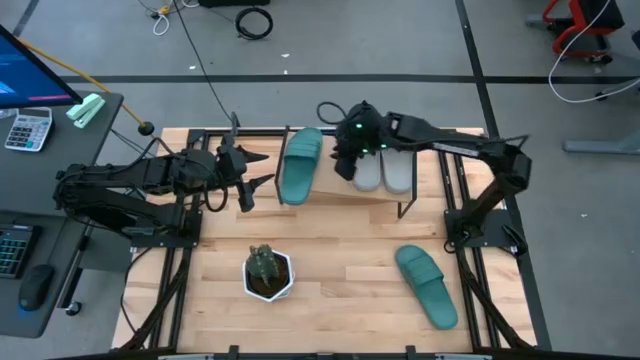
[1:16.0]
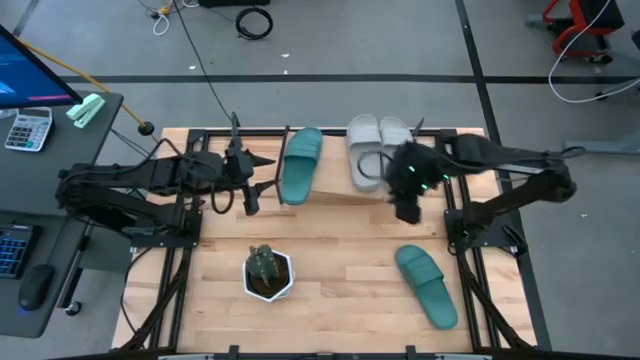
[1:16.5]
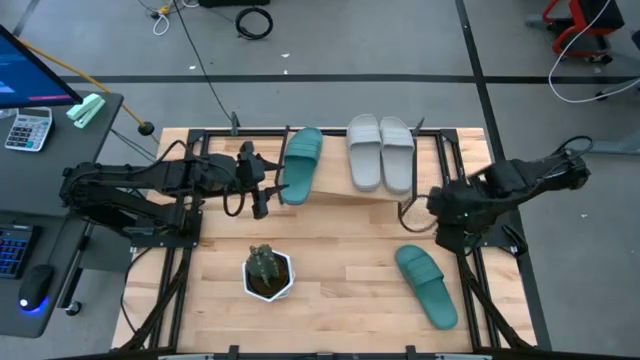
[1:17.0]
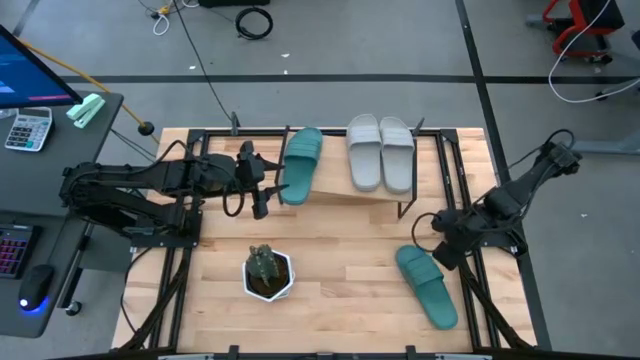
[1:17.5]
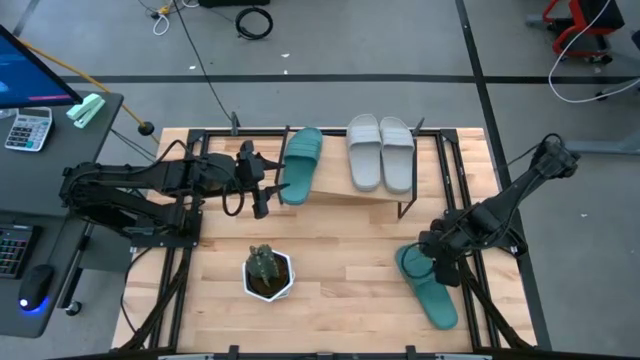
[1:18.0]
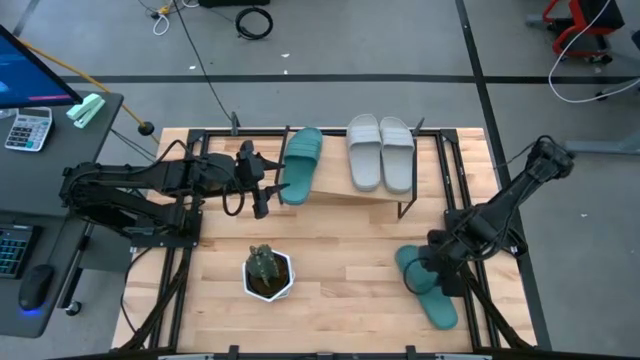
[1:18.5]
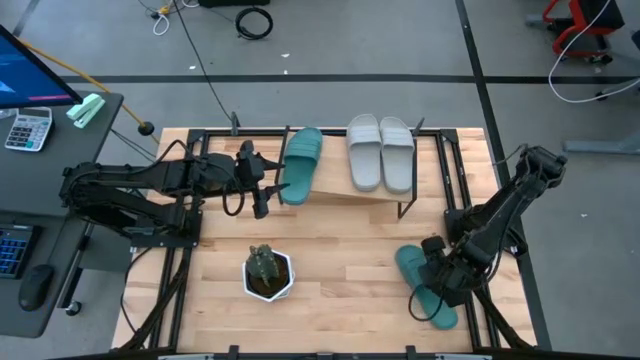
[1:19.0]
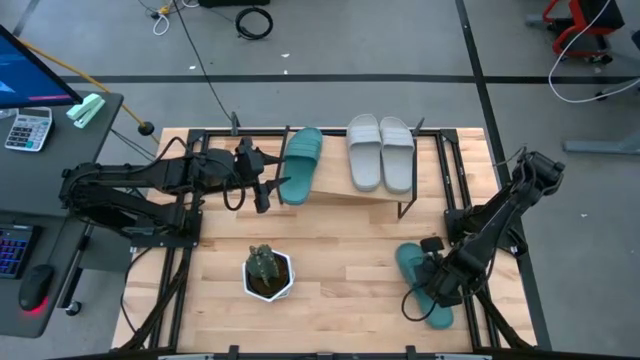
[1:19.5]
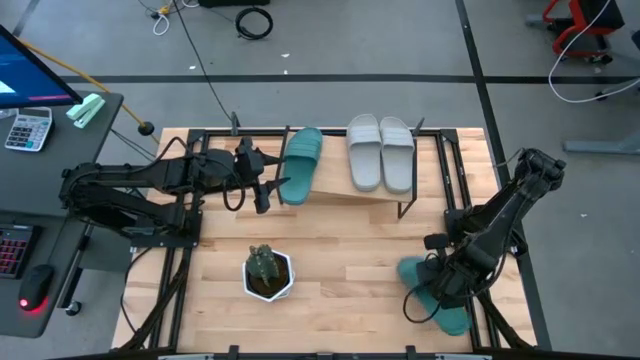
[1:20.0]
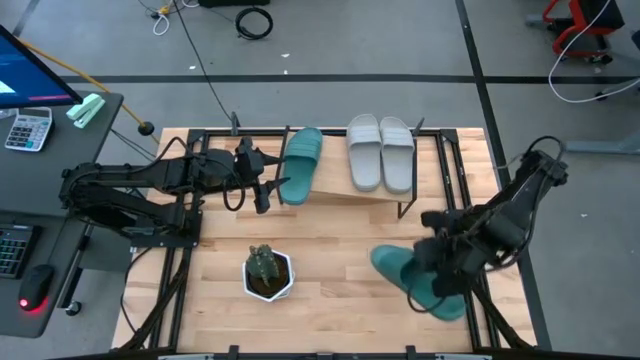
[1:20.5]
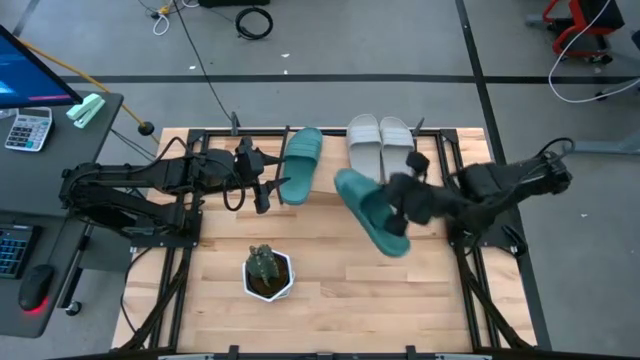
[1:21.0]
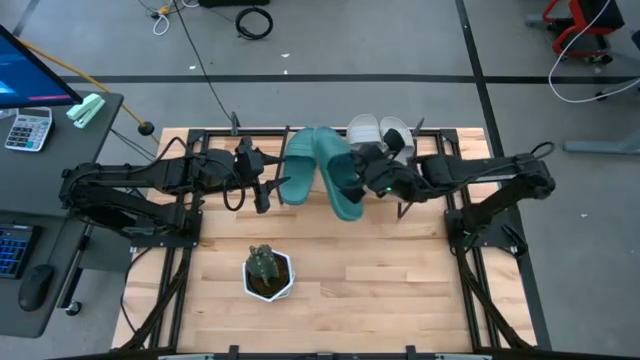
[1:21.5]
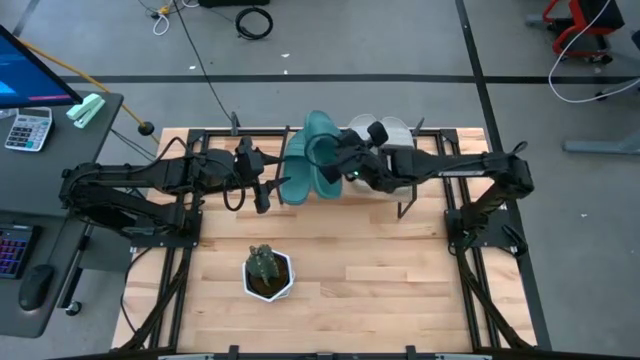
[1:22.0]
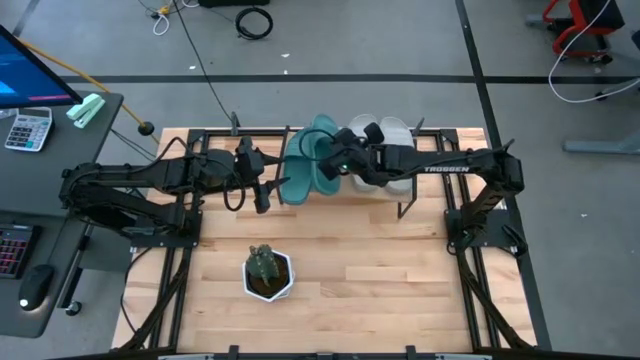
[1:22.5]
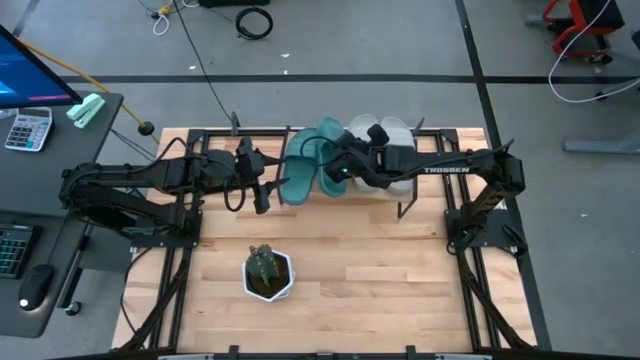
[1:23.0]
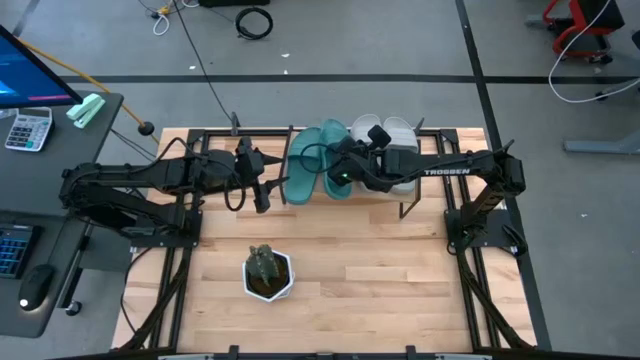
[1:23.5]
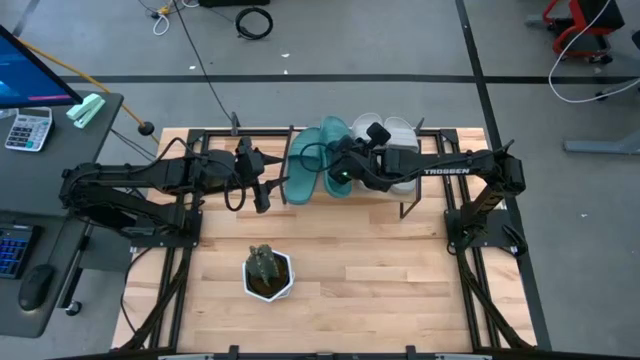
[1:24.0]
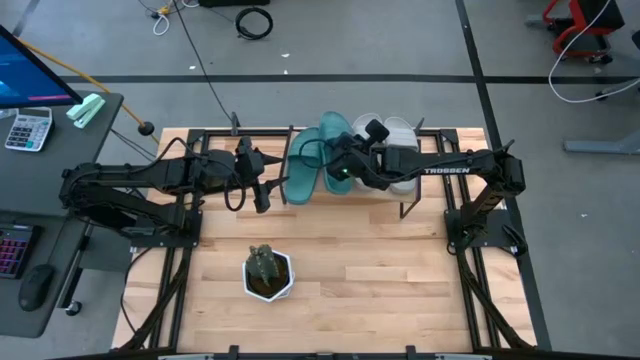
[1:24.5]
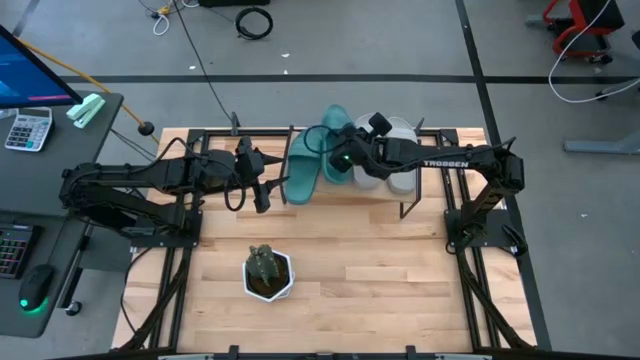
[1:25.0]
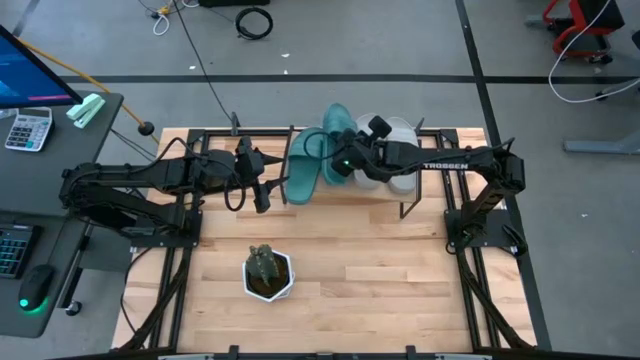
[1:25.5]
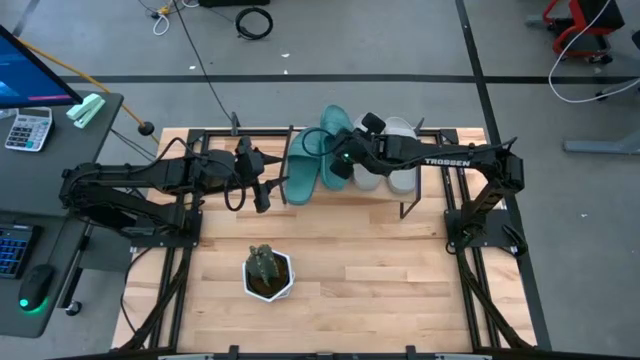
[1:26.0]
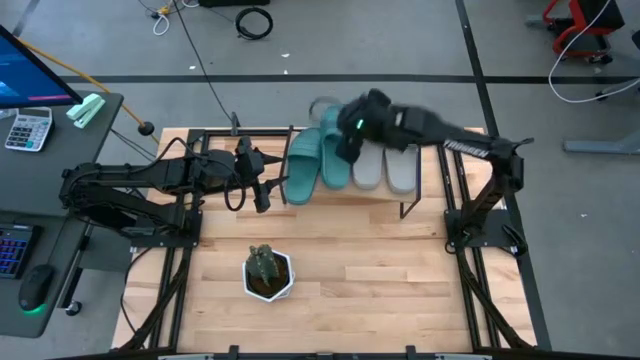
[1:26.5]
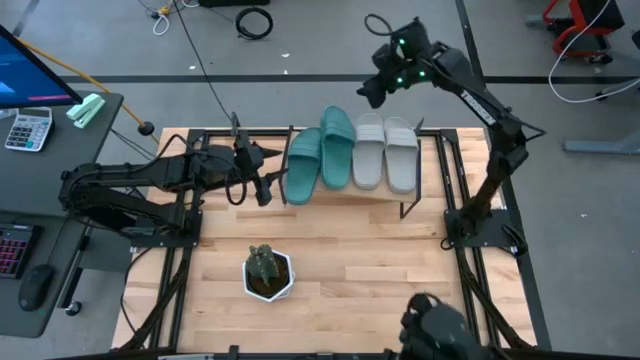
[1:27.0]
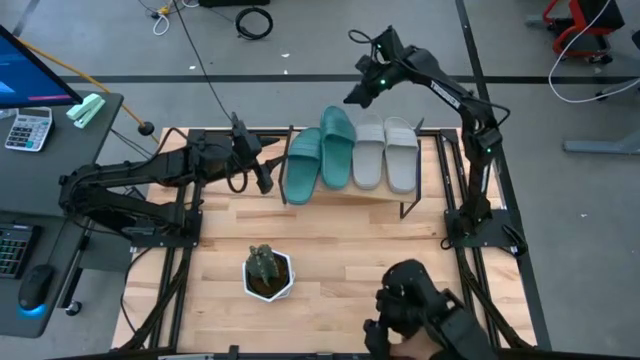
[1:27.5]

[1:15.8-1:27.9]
Task: Pick and place slides into the shelf
Put the green slide on the shelf

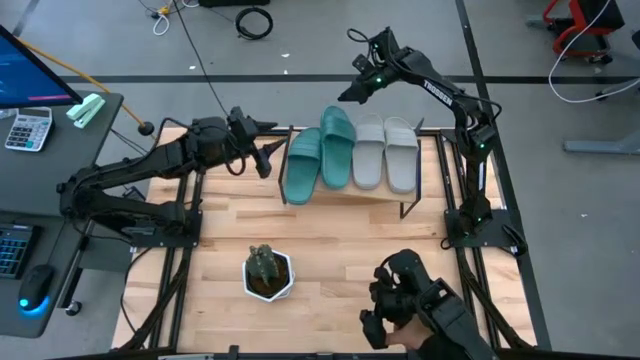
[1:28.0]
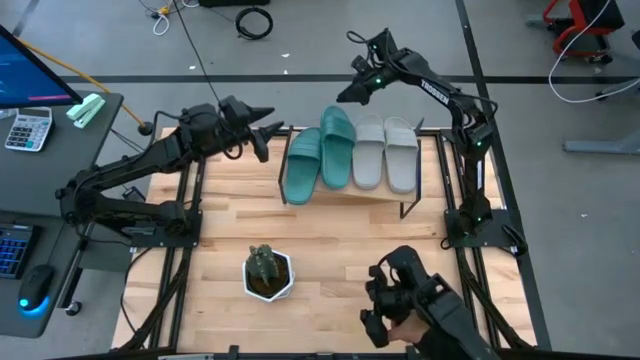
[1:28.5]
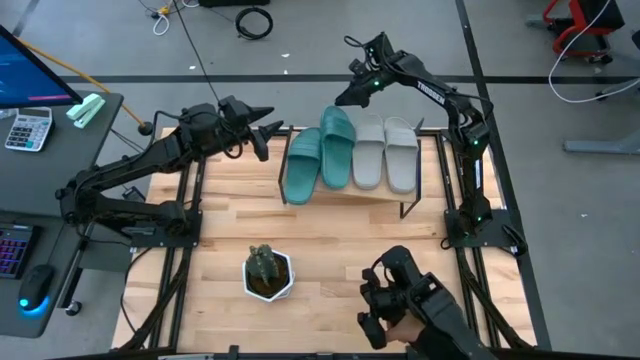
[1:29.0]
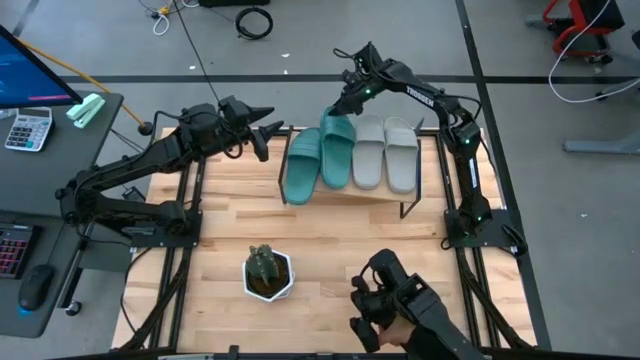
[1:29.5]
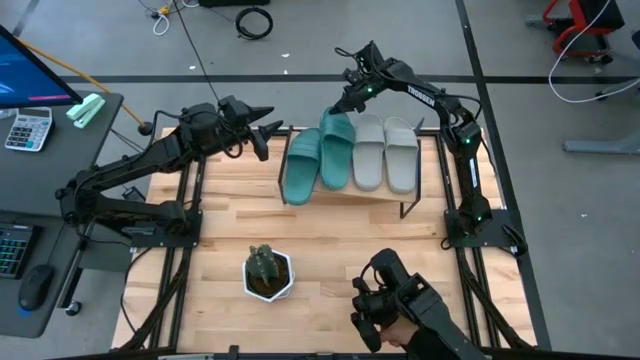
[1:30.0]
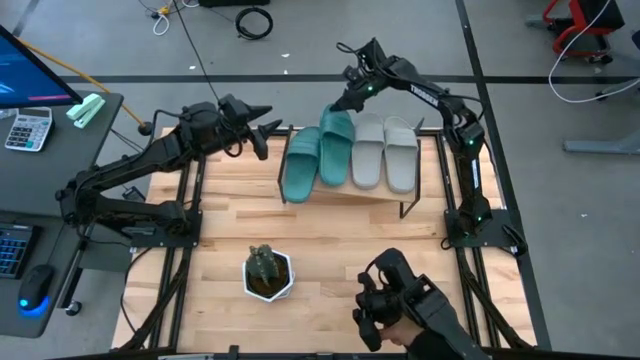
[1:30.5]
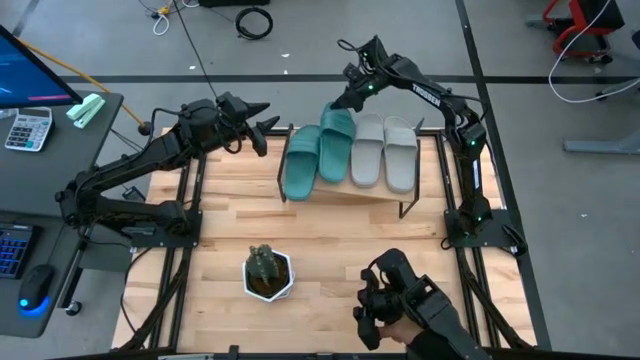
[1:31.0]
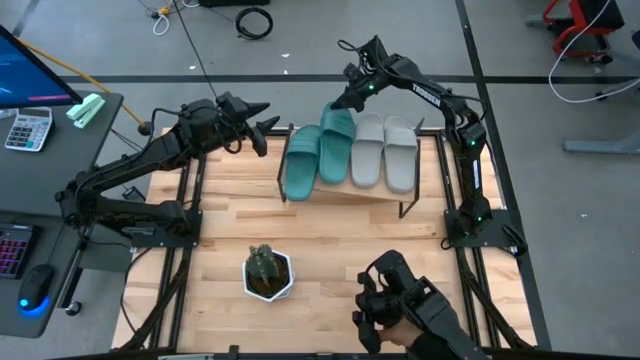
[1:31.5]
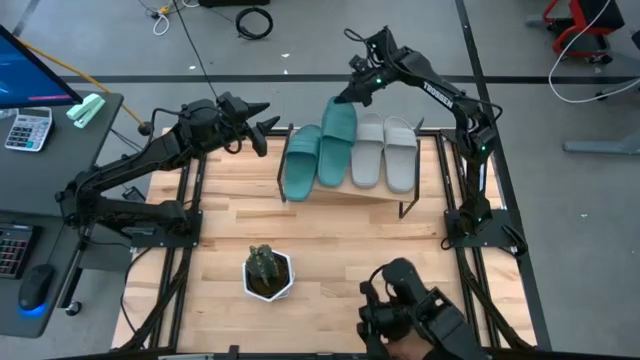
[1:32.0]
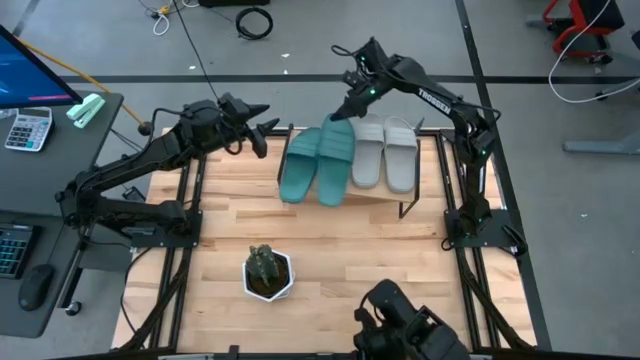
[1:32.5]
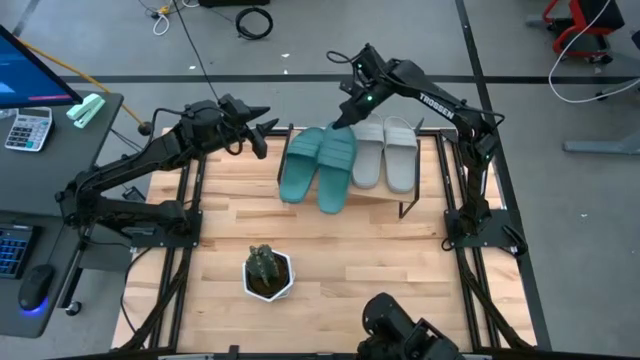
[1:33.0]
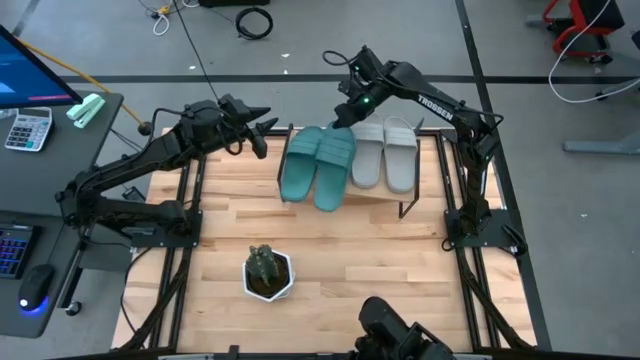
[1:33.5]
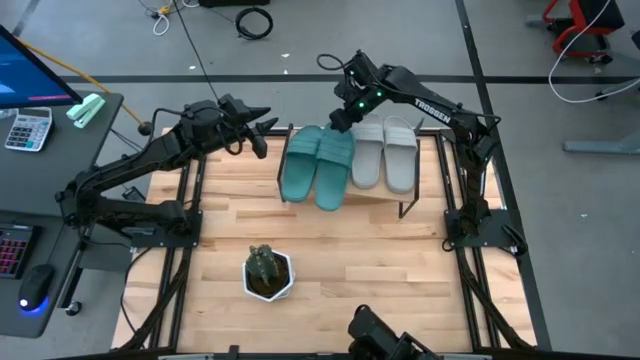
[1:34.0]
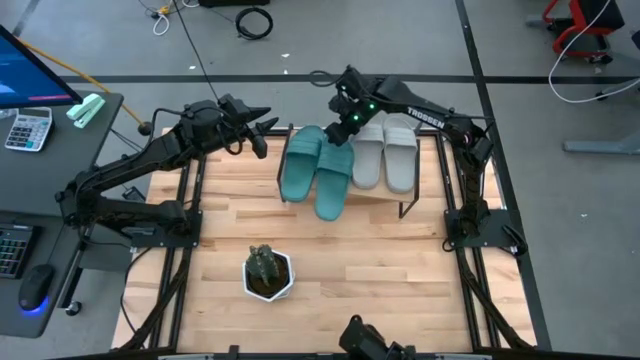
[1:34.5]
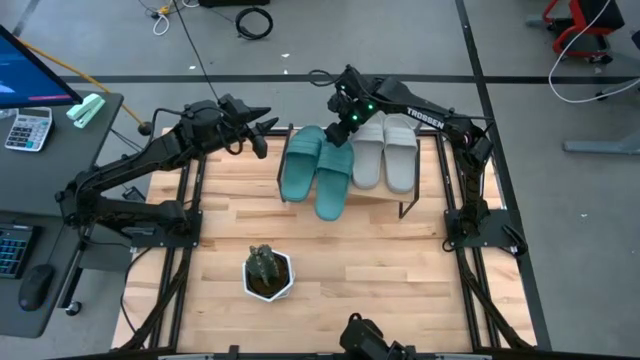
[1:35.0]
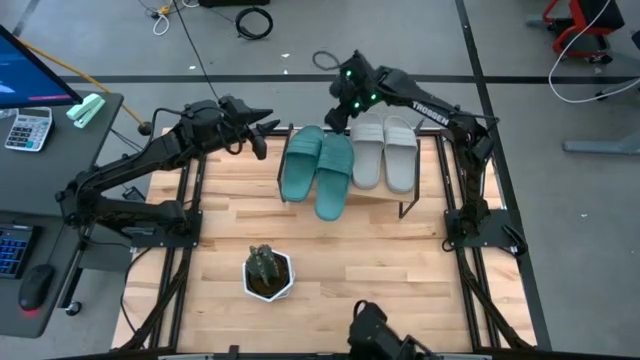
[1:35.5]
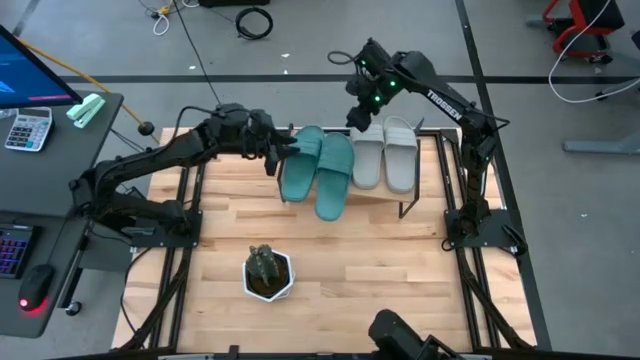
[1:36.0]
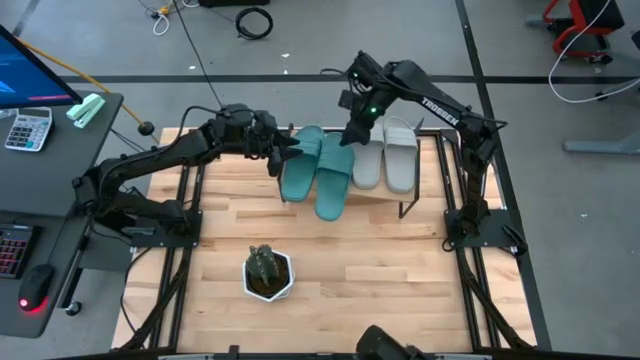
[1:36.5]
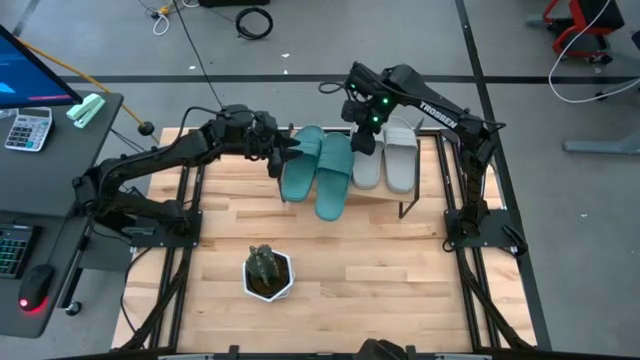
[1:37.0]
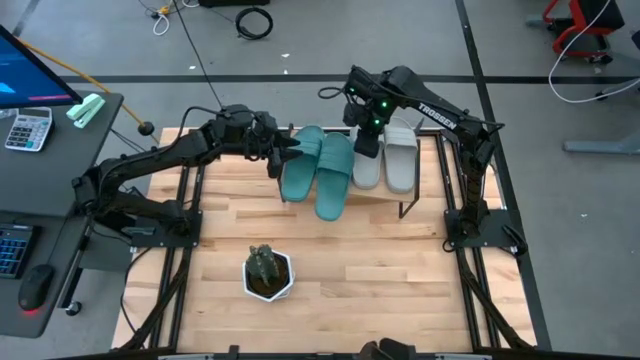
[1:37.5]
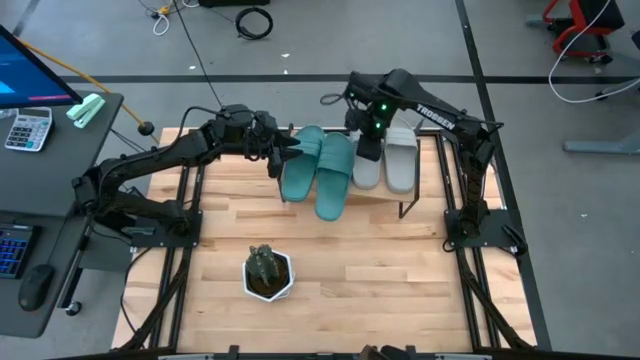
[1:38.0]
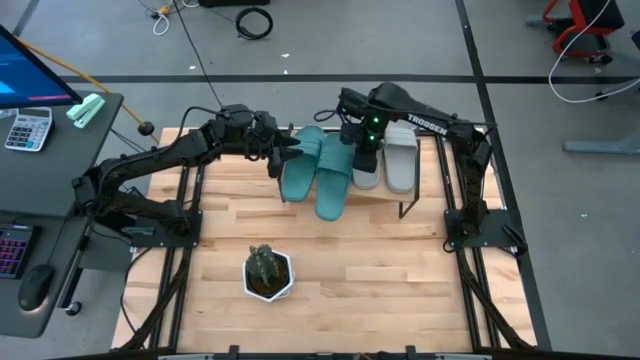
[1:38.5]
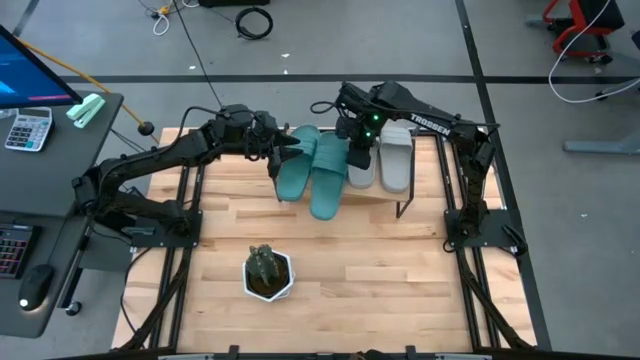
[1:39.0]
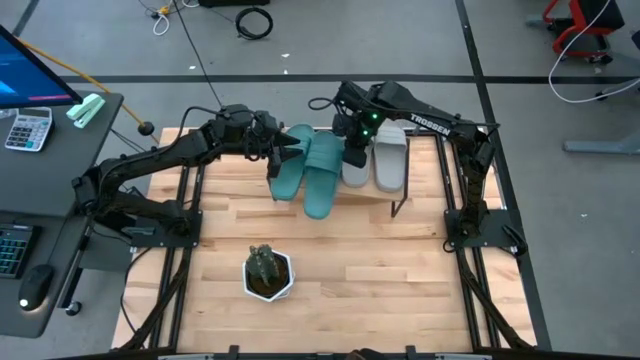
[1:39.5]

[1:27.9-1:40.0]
Put the green slide on the shelf
